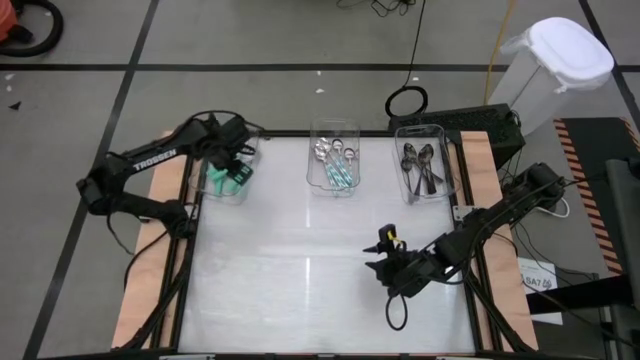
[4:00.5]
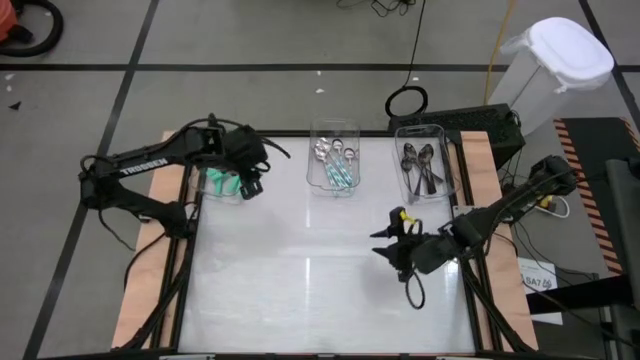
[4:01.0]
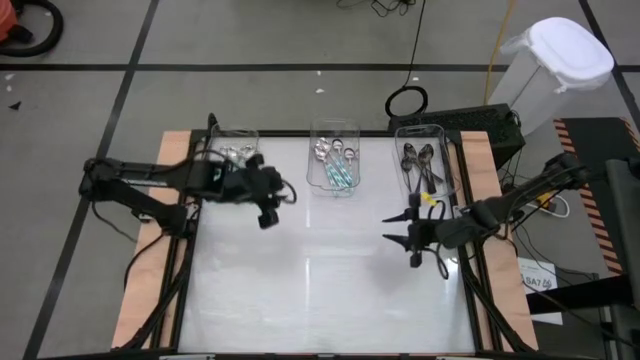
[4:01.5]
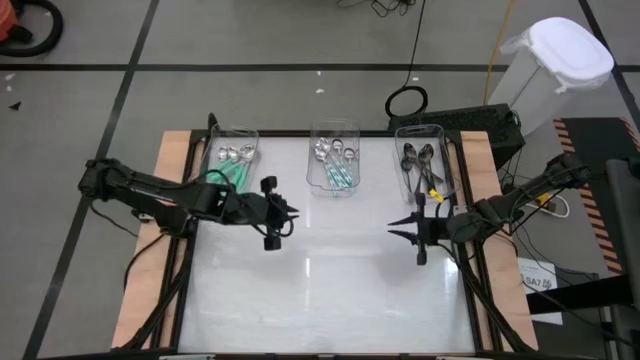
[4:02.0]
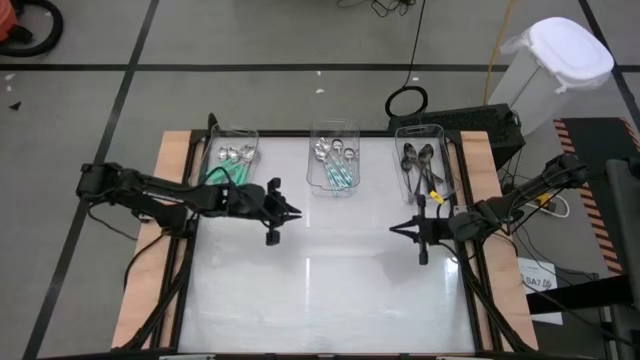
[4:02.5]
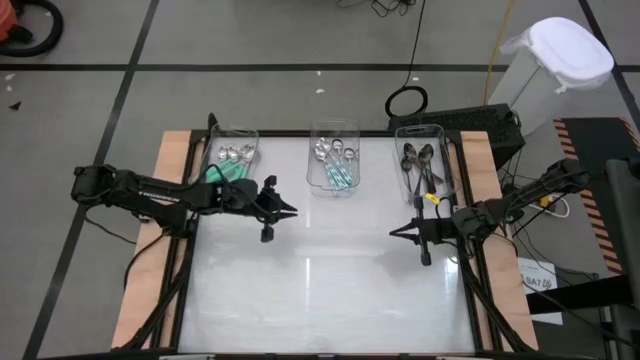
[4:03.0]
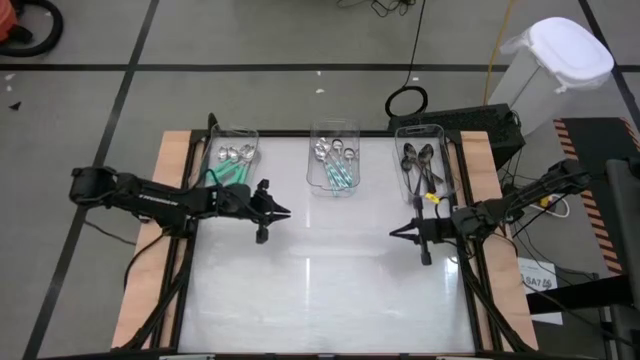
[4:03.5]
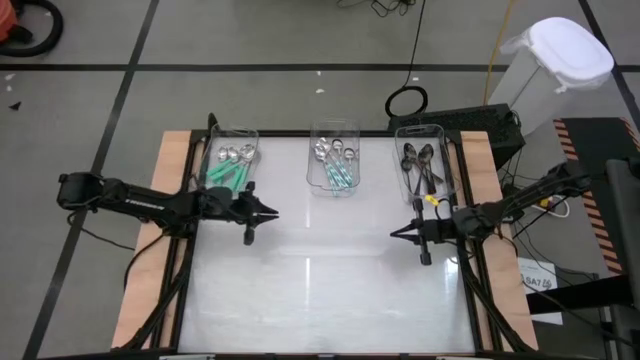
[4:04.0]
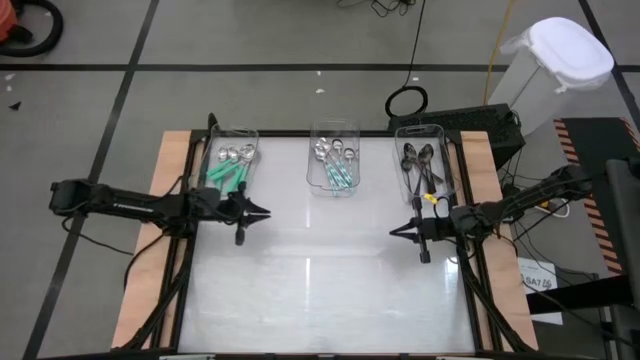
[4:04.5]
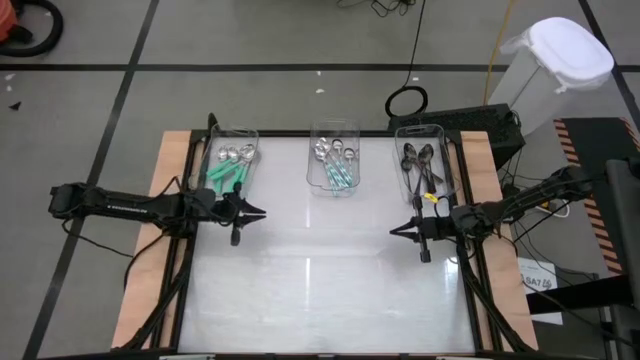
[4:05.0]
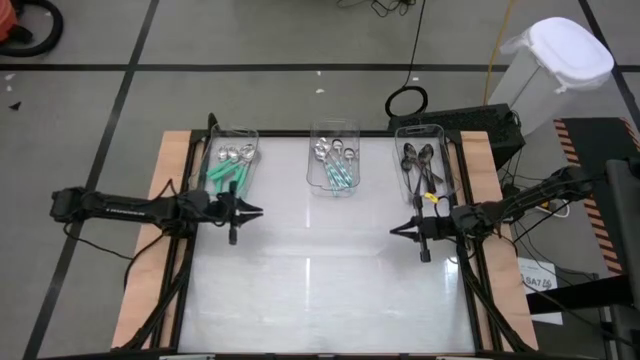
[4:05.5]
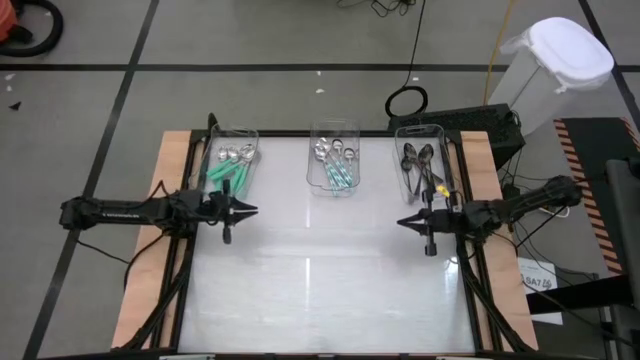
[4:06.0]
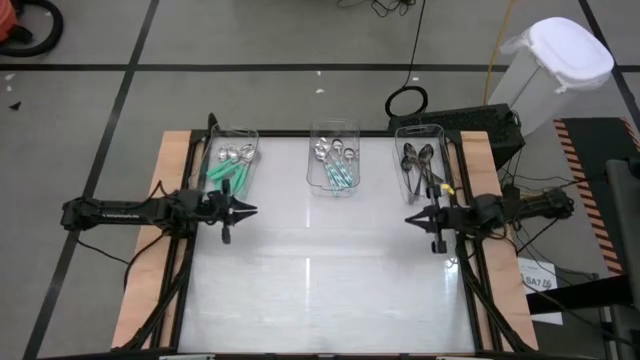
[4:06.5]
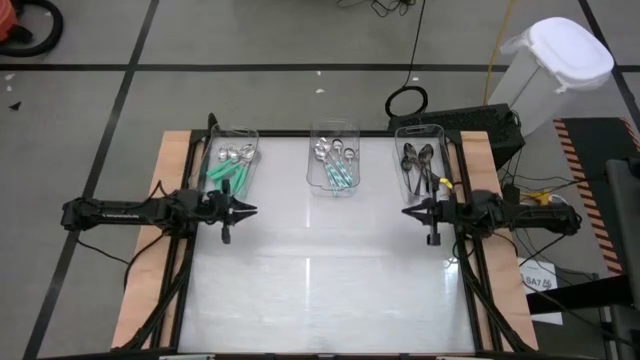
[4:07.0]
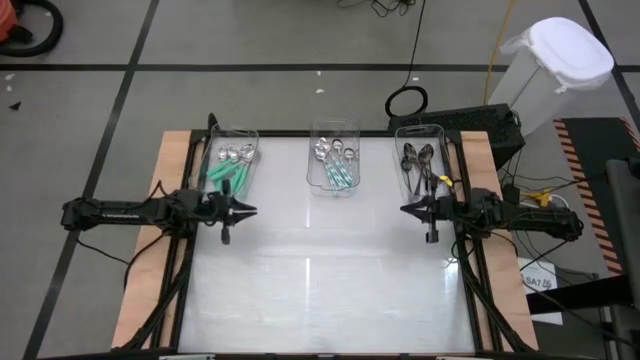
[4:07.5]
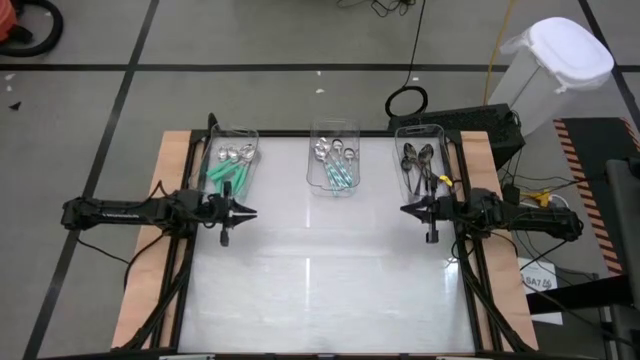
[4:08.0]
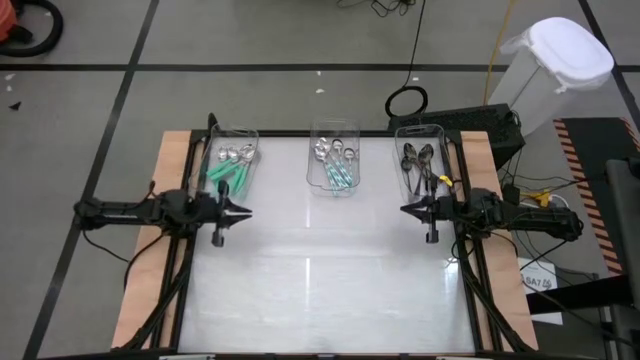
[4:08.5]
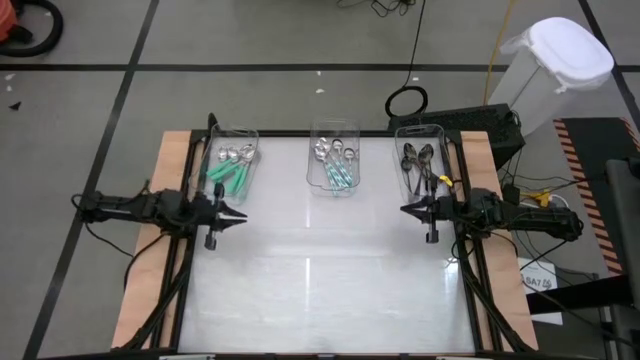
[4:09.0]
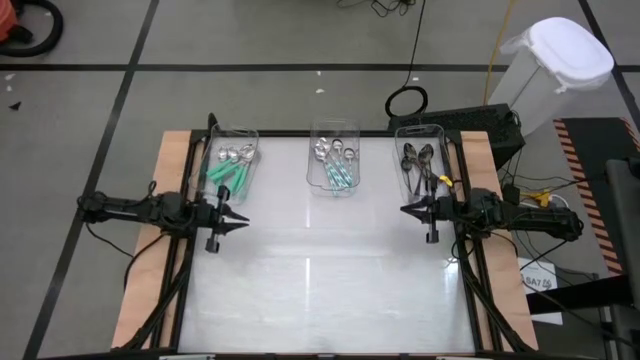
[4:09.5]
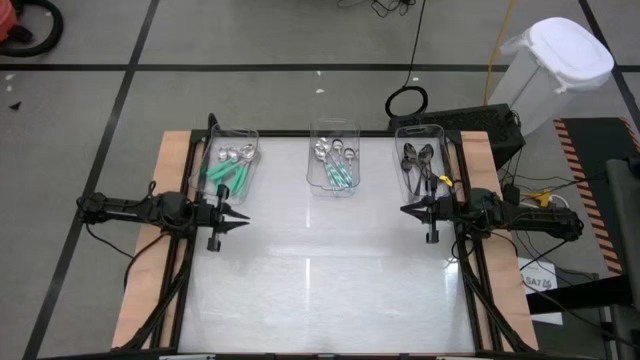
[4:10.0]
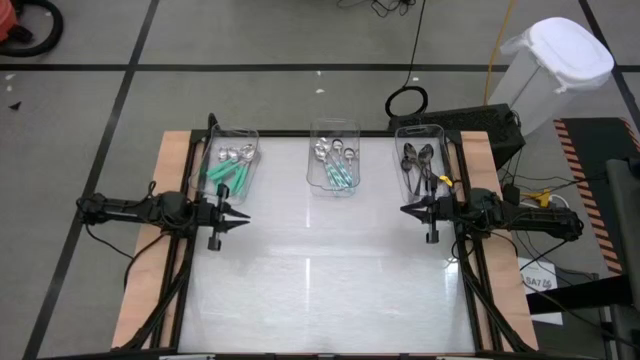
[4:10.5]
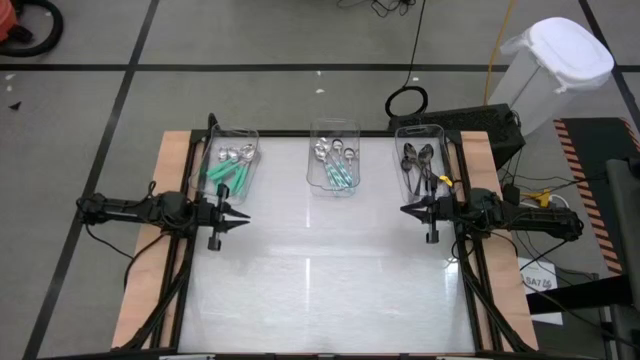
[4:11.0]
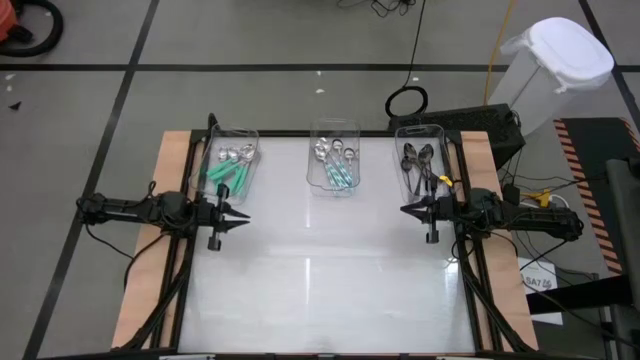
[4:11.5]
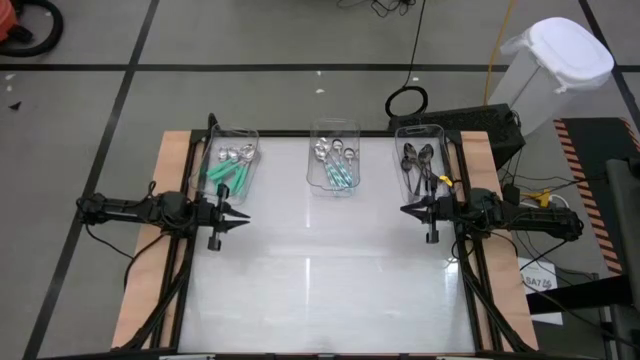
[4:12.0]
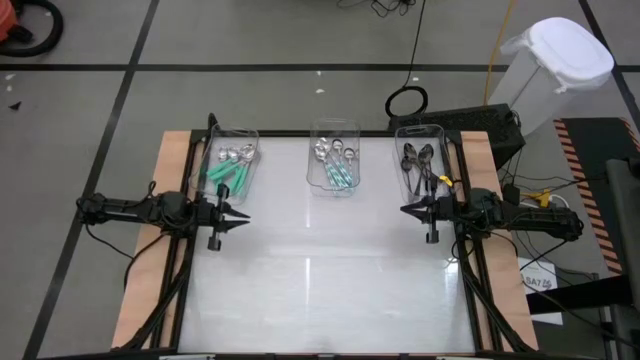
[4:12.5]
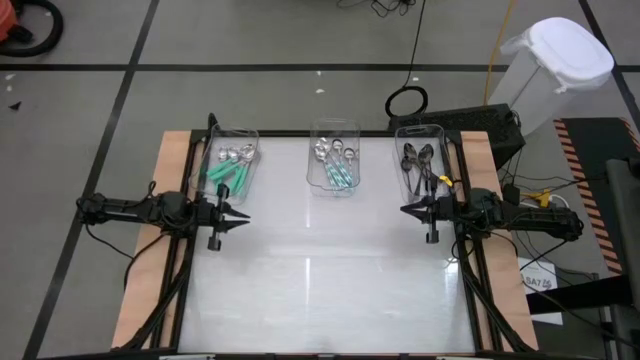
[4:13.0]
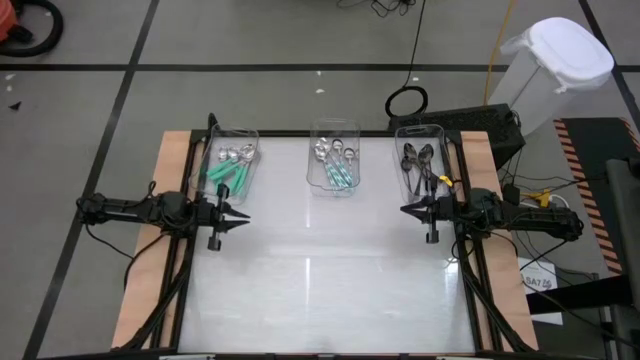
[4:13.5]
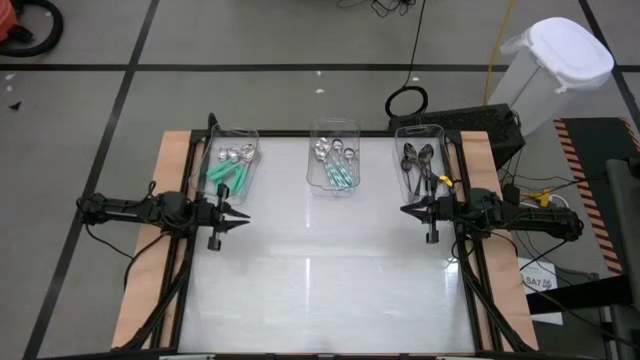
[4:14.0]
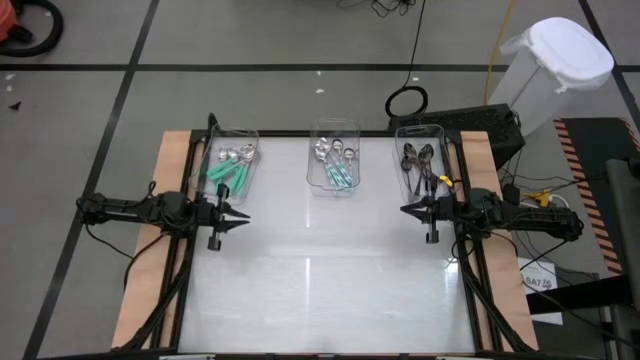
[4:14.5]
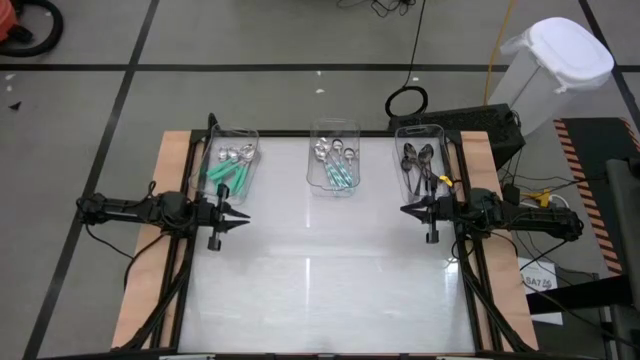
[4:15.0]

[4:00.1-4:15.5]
Task: Sort silverware by color (type)
Return to Home Position

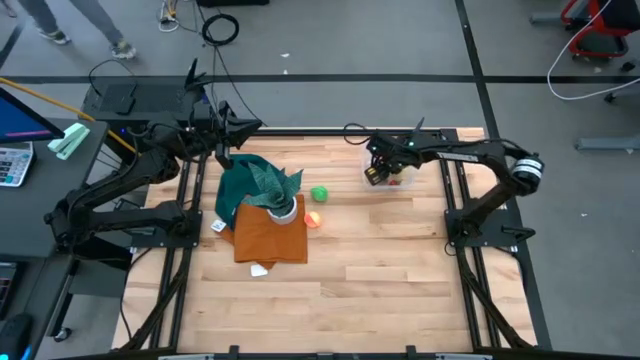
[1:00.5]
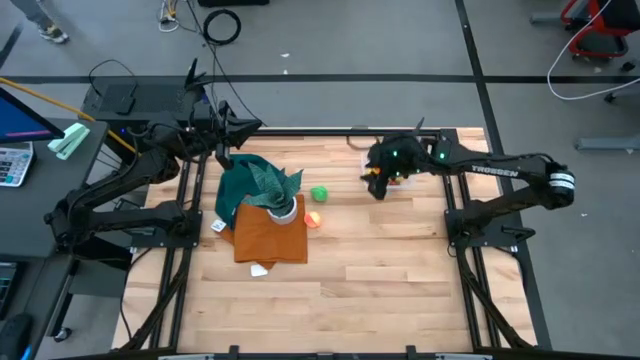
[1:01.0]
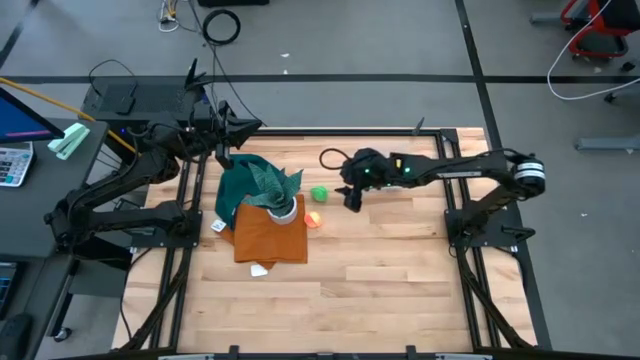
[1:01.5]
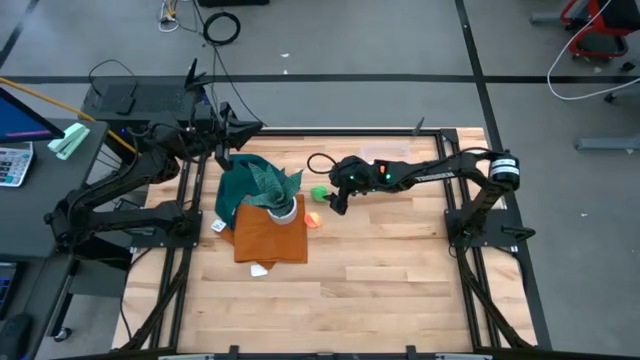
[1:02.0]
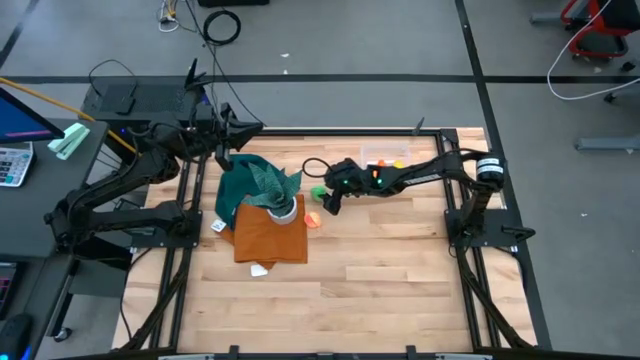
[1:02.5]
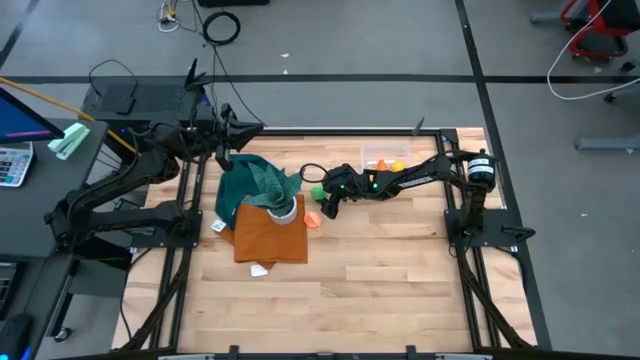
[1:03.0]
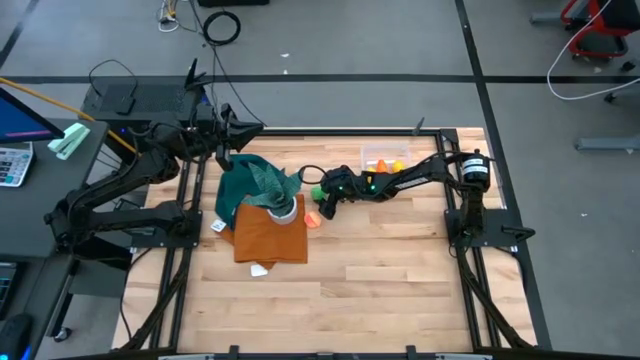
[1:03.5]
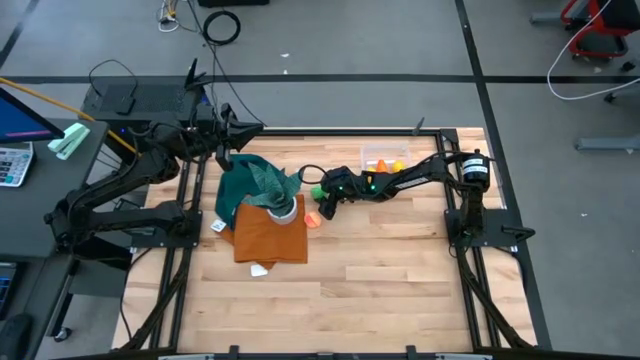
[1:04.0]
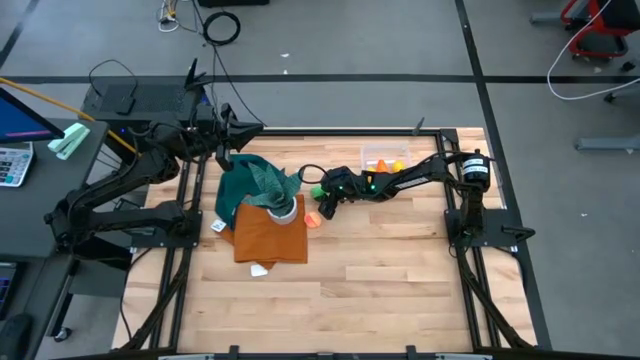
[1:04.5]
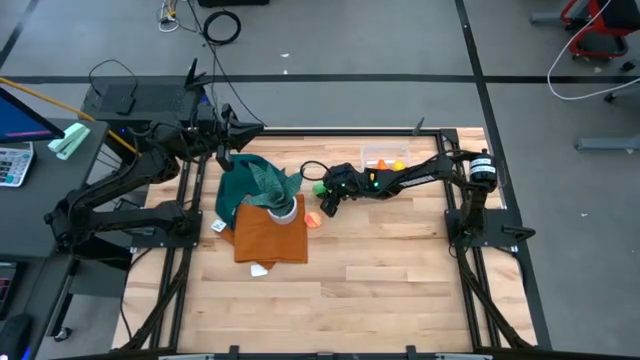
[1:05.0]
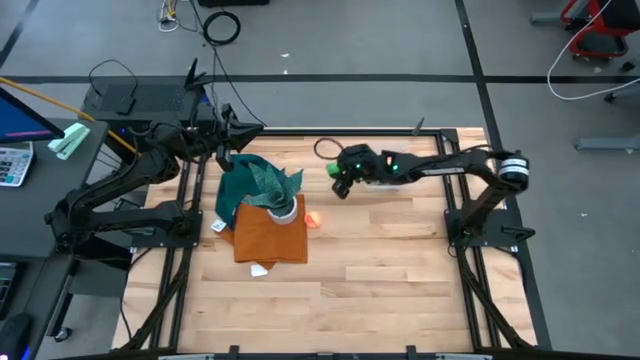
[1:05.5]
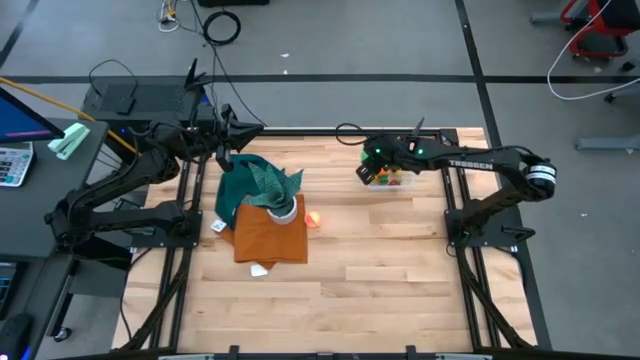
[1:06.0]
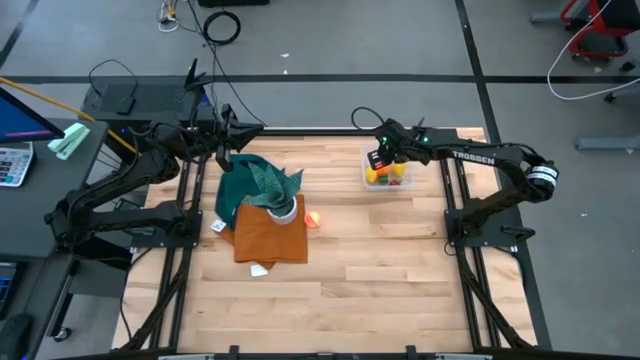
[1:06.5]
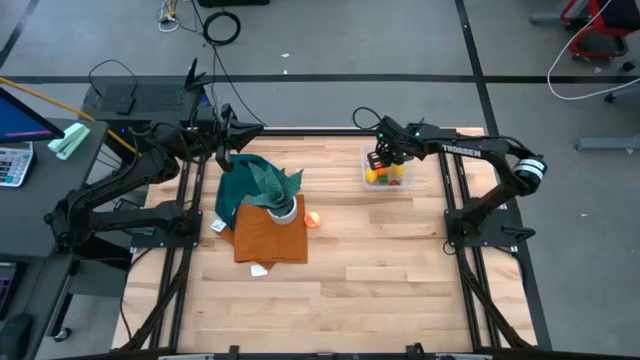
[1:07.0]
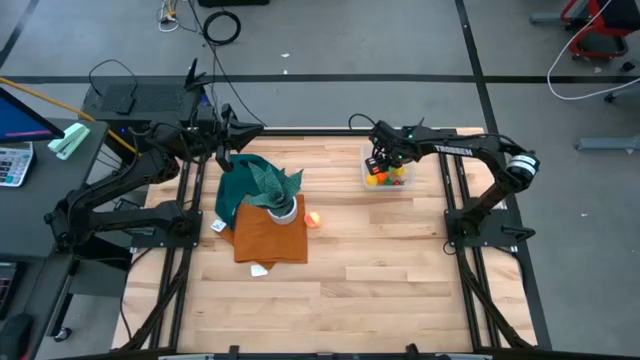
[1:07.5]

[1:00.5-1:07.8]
Task: Pick and placing Produce into tupperware
Put the avocado into the transparent bin
